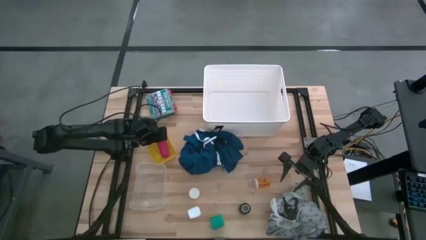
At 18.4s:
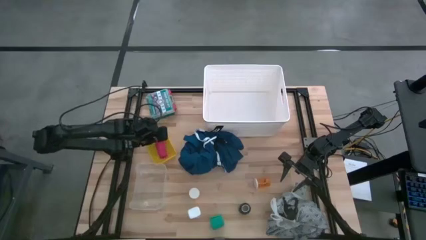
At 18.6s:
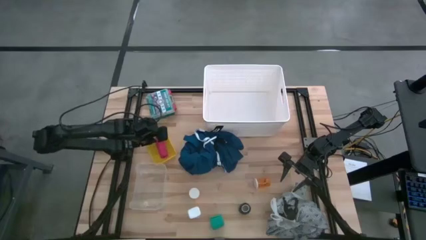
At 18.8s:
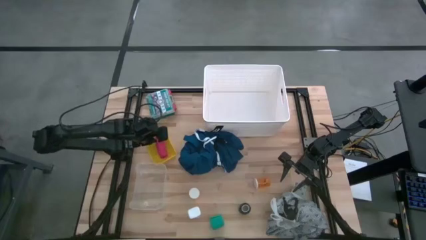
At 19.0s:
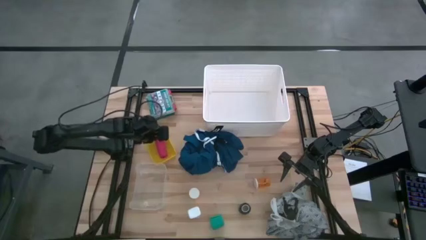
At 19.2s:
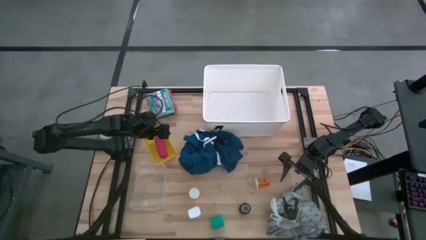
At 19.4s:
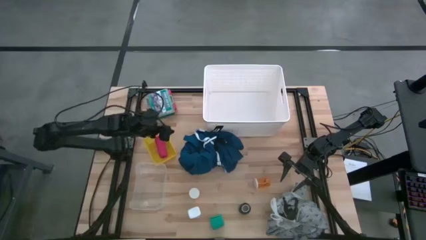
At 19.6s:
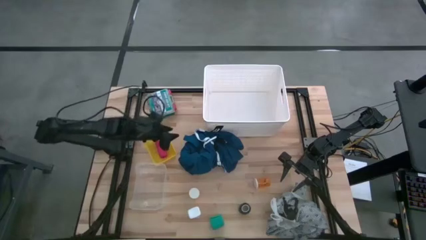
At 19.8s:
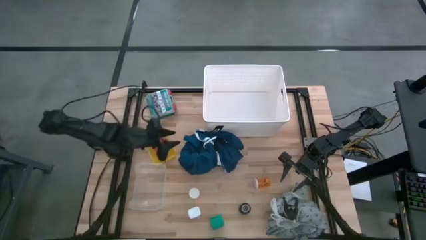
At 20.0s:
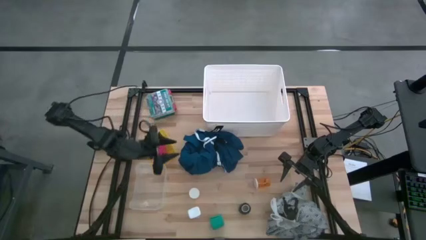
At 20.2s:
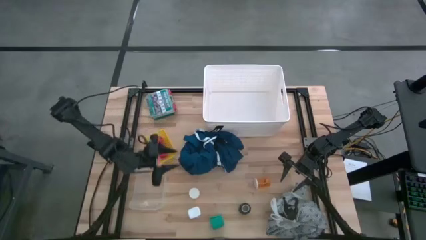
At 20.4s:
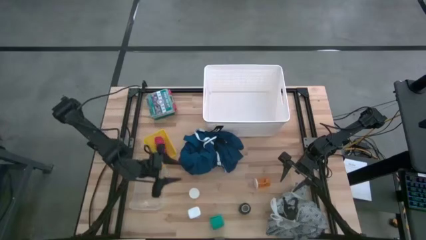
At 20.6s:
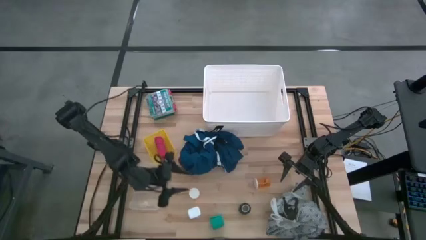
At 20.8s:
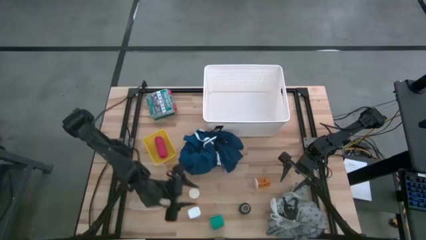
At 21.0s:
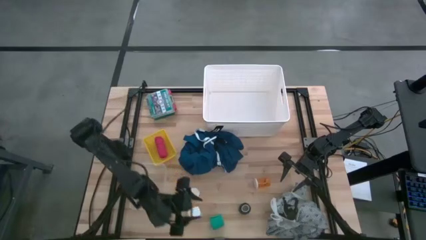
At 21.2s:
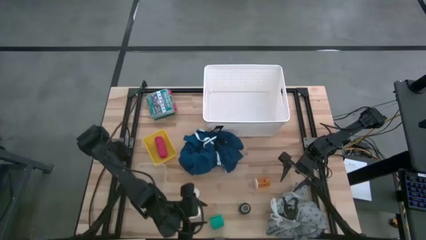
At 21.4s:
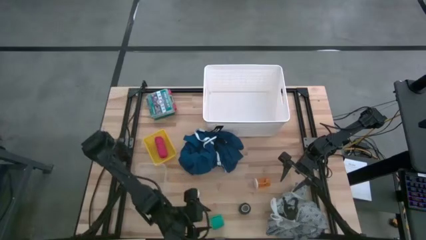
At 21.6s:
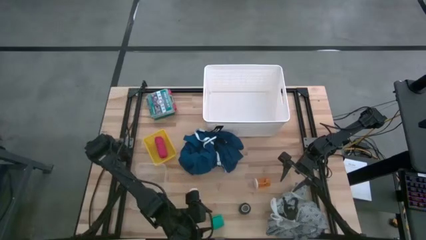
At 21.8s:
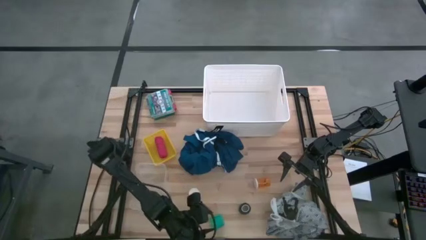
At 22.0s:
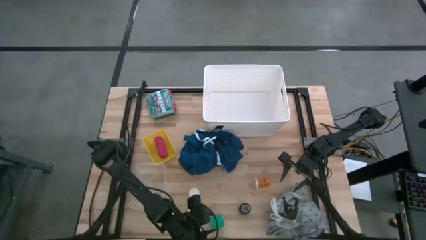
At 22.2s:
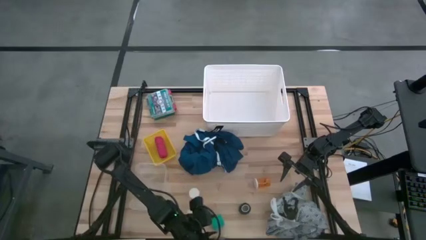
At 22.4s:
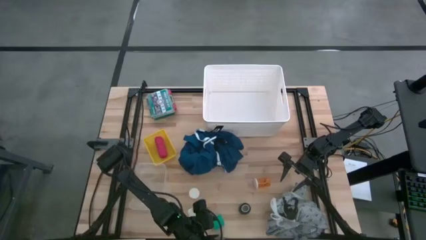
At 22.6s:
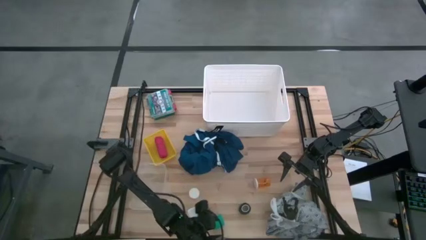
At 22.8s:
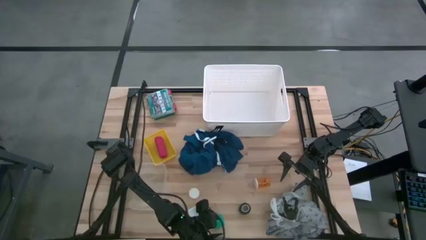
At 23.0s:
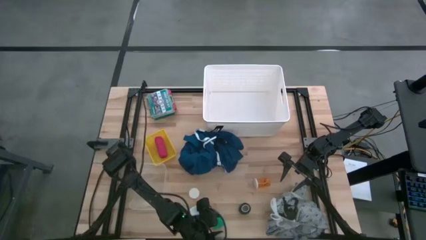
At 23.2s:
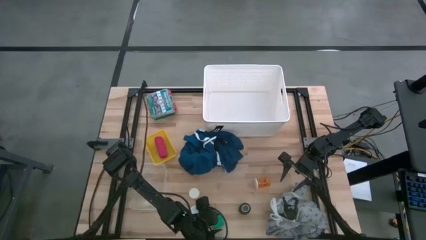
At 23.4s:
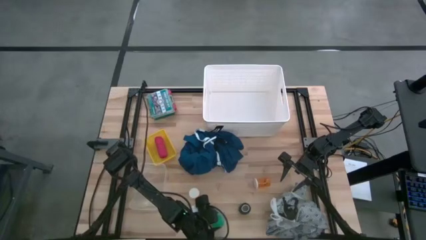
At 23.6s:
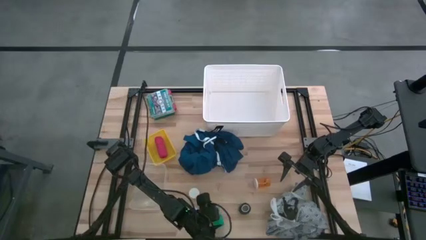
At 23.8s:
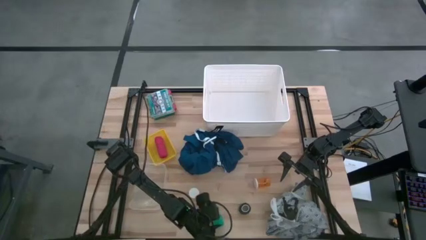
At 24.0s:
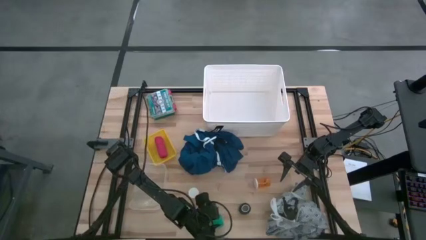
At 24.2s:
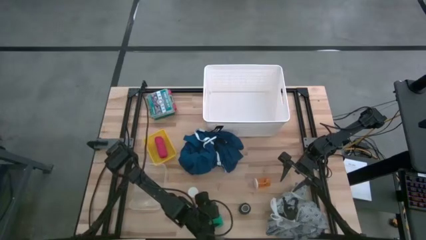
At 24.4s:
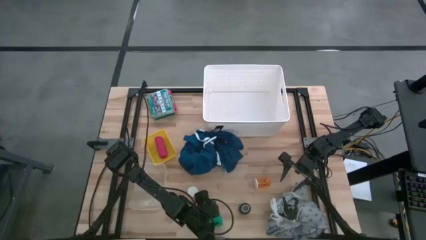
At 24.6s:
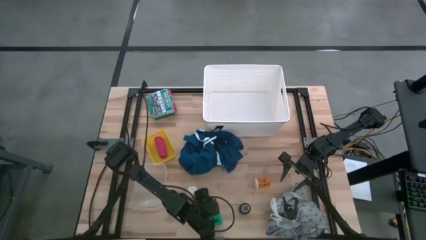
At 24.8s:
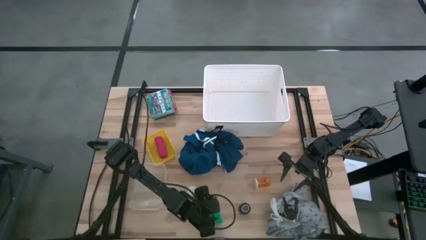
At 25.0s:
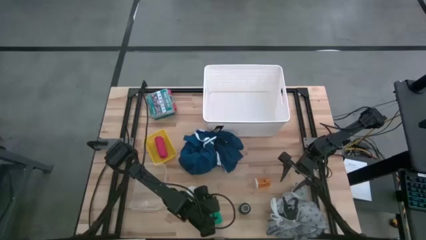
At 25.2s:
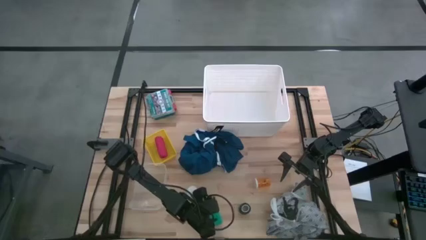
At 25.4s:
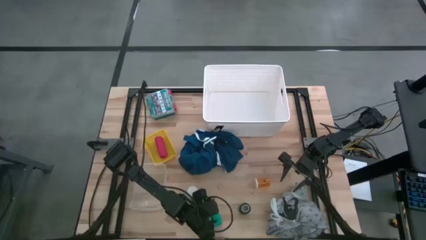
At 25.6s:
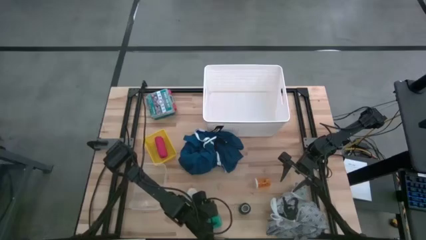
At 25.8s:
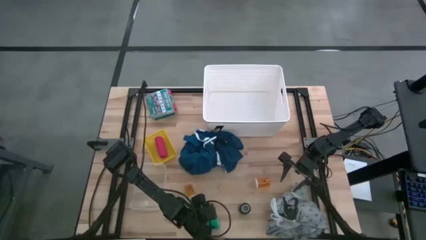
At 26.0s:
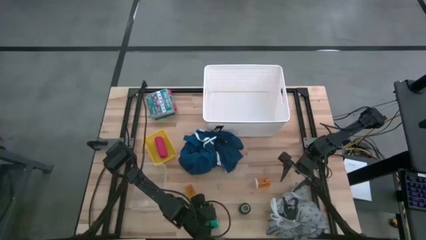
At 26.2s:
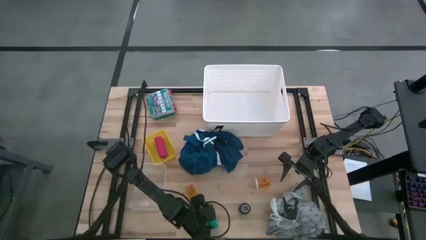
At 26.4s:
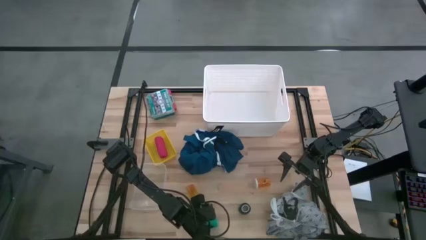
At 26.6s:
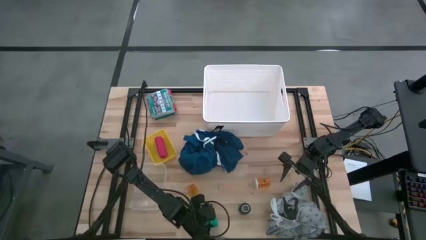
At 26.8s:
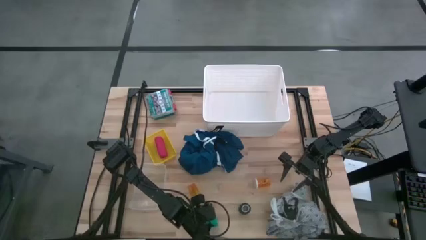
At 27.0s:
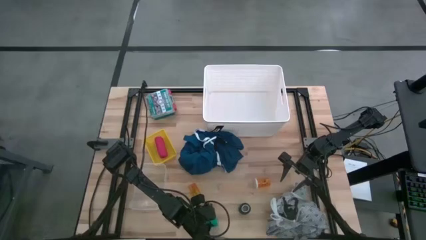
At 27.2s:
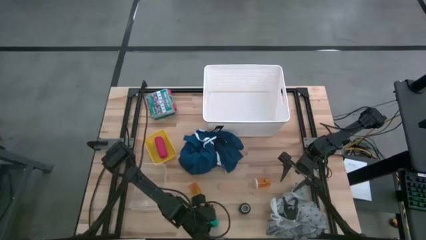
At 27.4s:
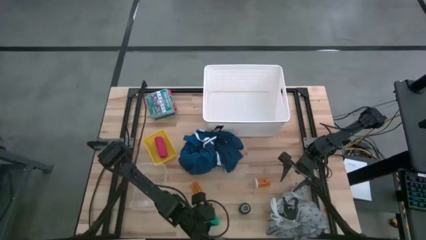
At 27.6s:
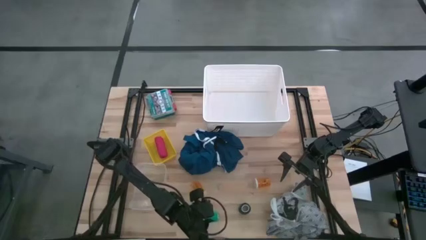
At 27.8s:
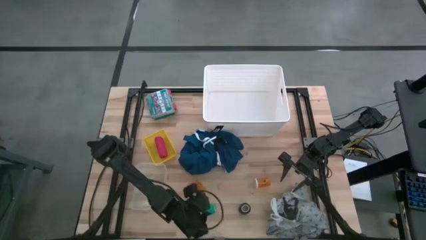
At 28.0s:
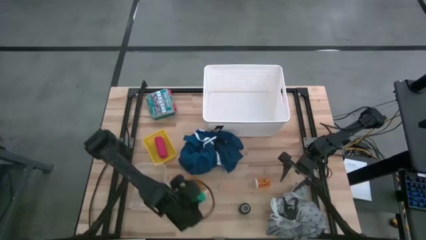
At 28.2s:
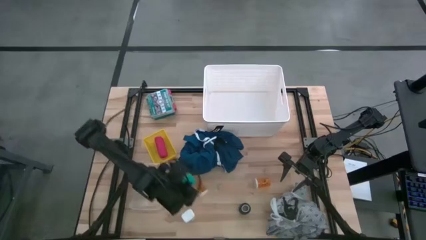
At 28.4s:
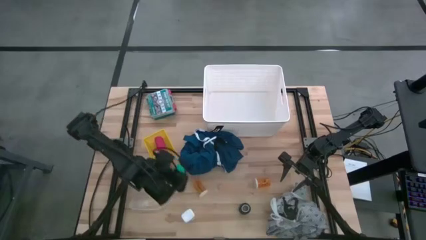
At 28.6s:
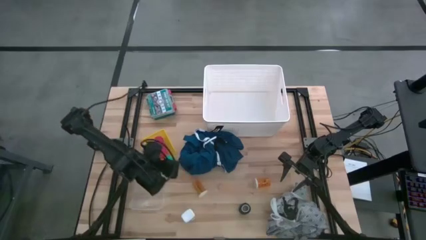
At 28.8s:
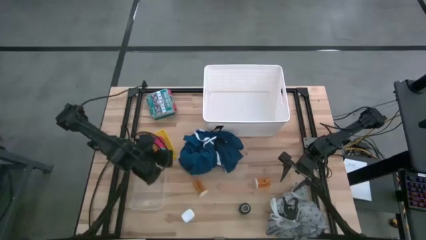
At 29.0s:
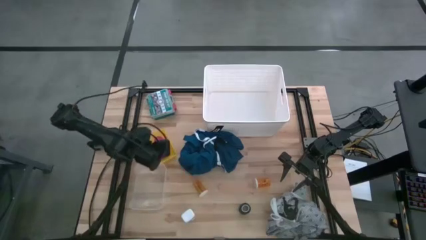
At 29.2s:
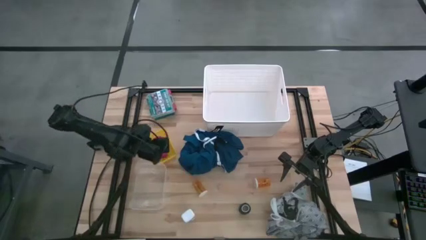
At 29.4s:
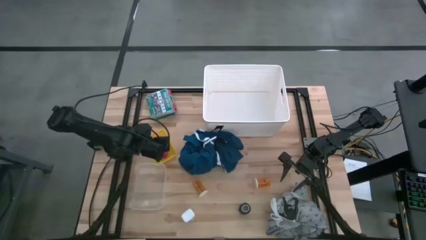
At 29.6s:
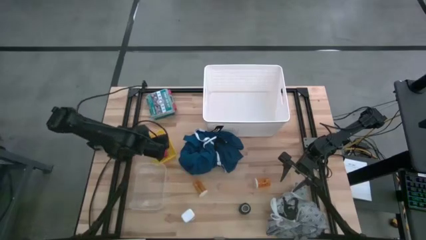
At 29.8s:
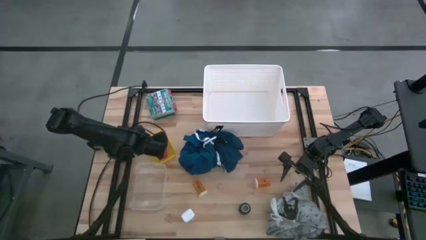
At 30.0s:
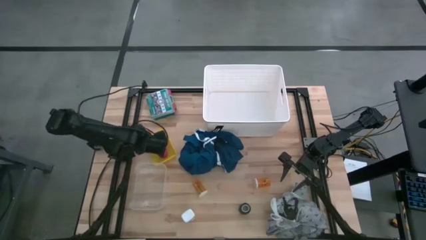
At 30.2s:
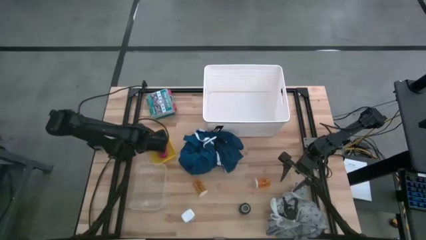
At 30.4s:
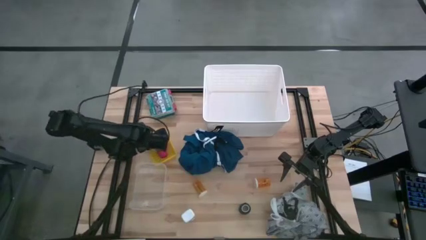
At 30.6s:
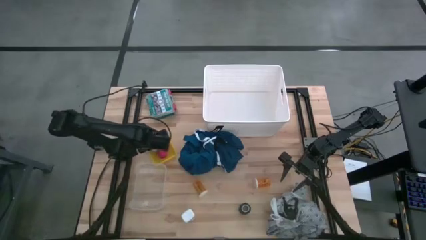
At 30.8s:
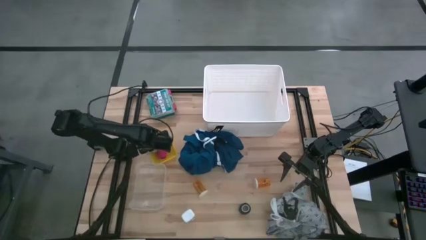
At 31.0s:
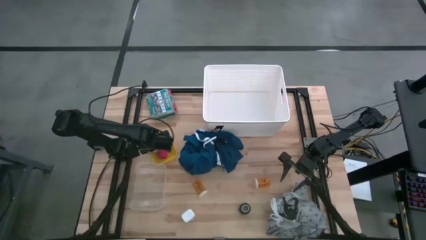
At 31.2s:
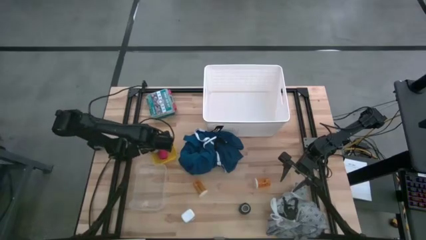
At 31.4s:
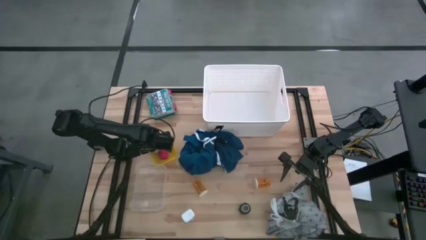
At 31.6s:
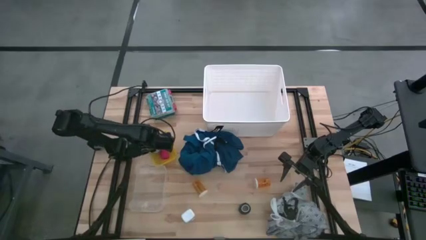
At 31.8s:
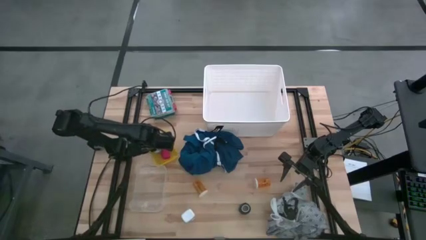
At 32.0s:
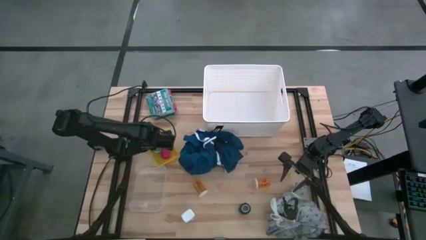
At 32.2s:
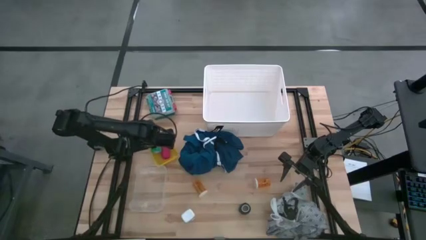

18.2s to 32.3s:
Task: Pick & place medical supplies in basket/bin
Put the blue bandage into the yellow bin
